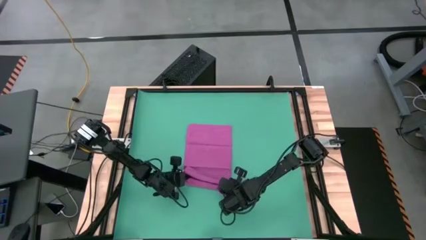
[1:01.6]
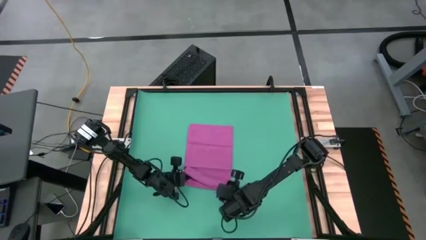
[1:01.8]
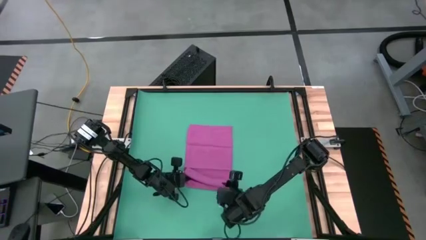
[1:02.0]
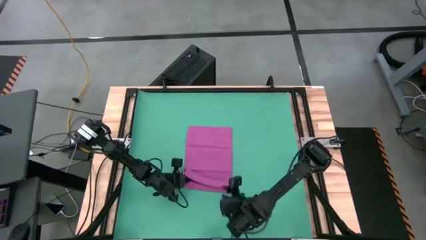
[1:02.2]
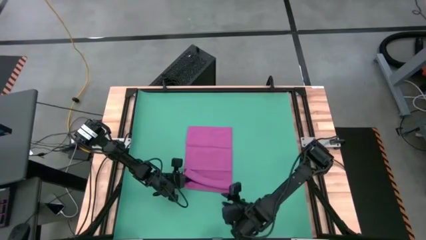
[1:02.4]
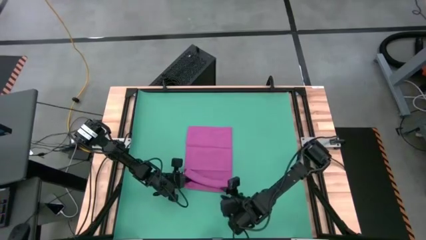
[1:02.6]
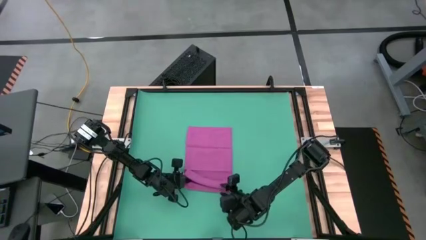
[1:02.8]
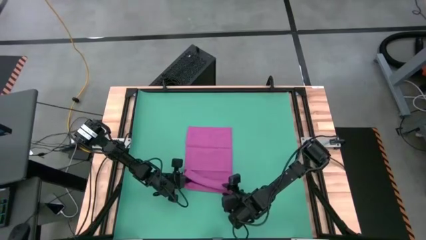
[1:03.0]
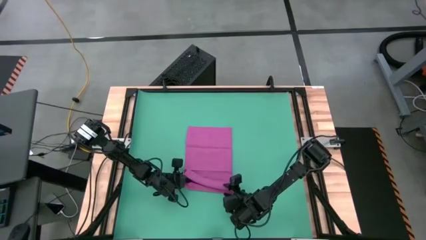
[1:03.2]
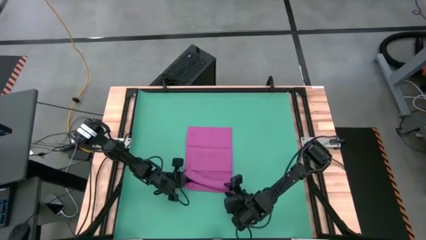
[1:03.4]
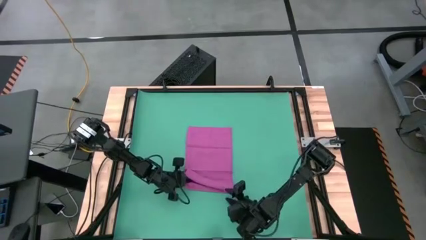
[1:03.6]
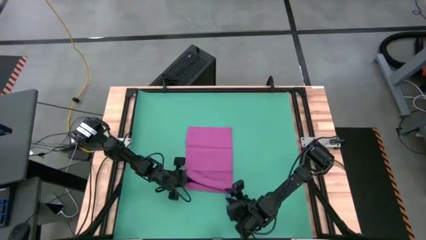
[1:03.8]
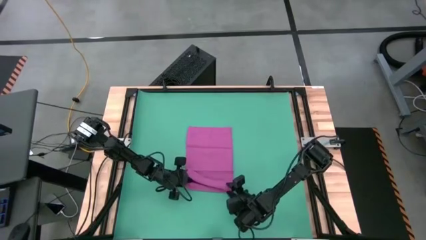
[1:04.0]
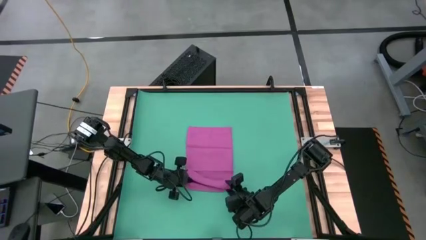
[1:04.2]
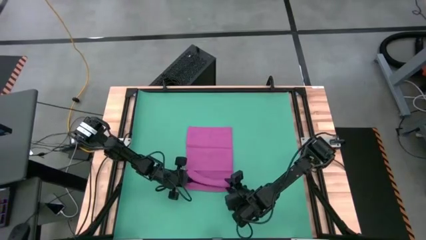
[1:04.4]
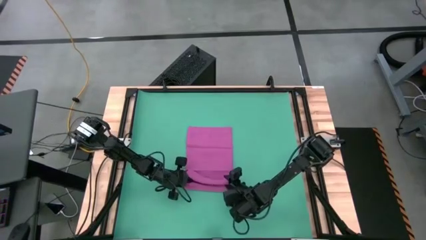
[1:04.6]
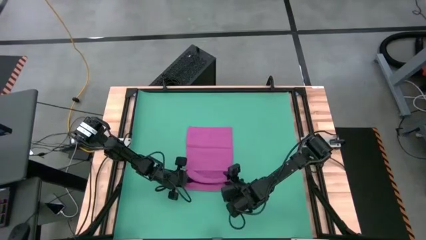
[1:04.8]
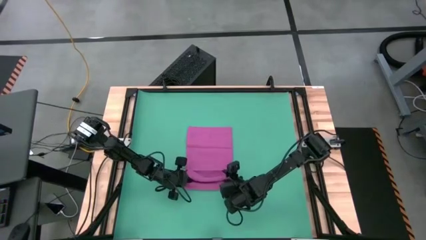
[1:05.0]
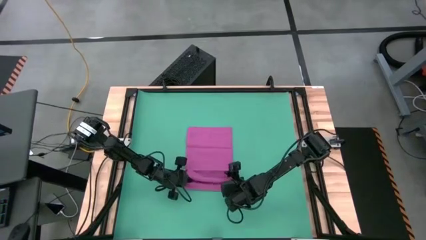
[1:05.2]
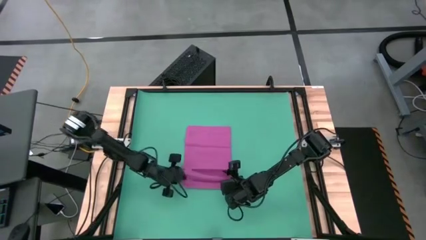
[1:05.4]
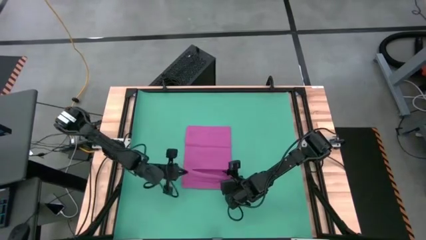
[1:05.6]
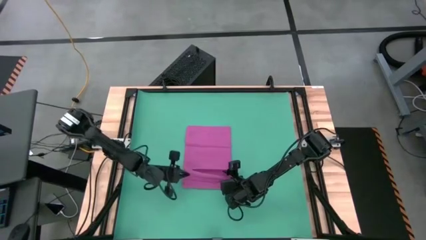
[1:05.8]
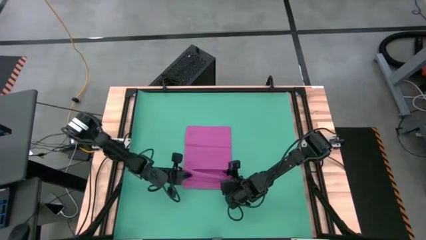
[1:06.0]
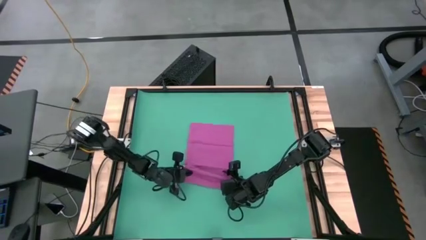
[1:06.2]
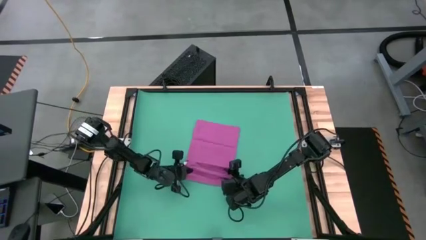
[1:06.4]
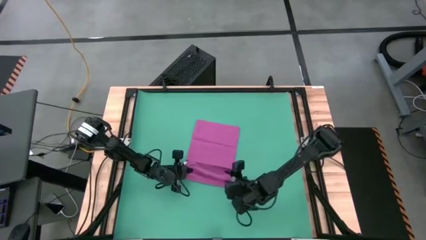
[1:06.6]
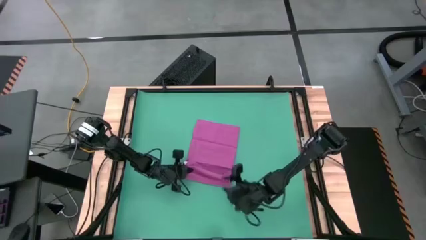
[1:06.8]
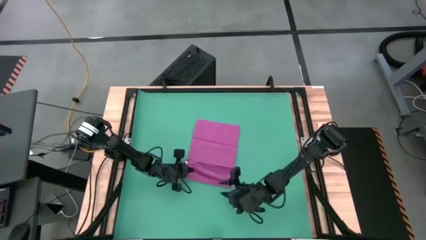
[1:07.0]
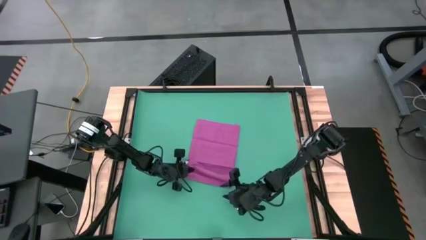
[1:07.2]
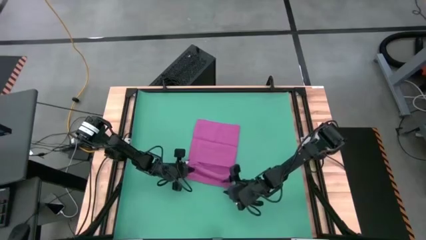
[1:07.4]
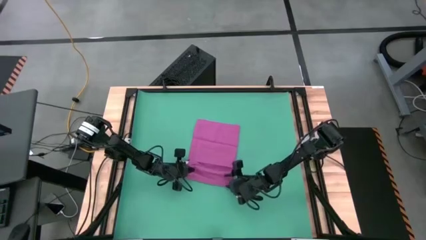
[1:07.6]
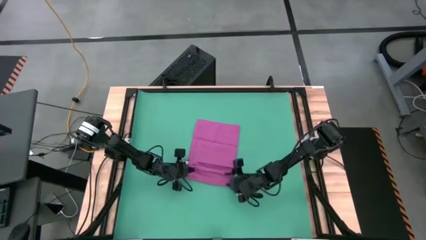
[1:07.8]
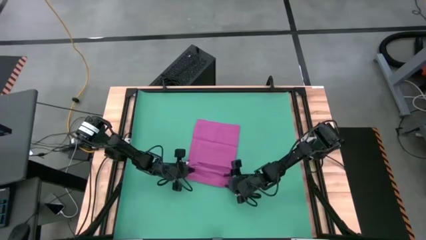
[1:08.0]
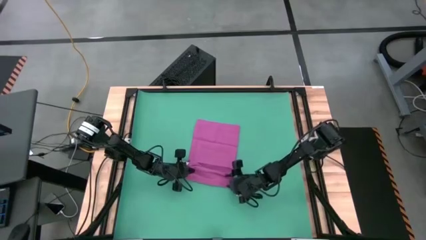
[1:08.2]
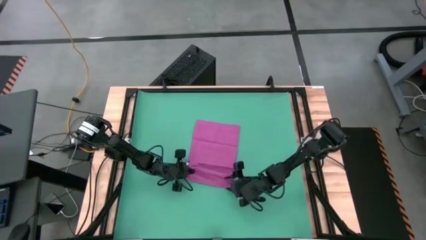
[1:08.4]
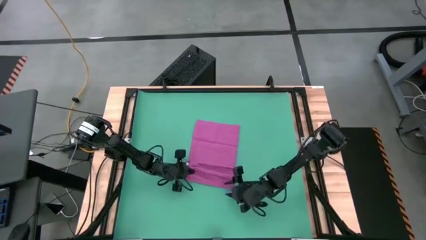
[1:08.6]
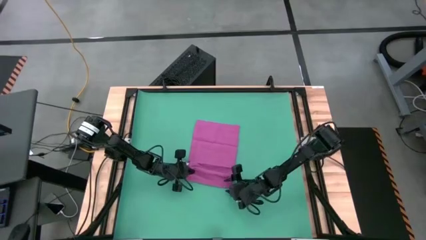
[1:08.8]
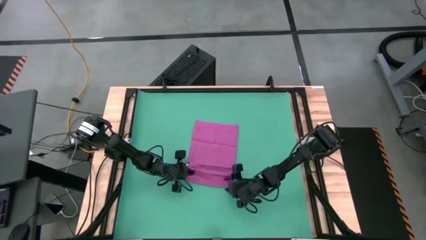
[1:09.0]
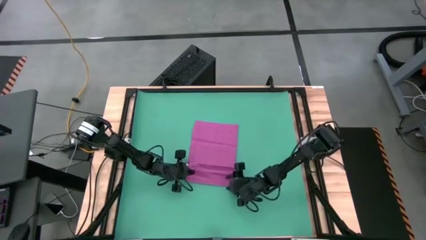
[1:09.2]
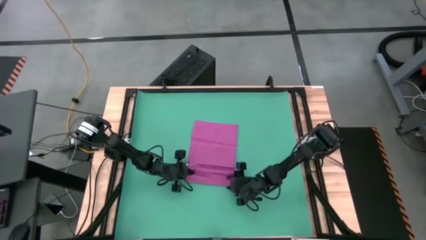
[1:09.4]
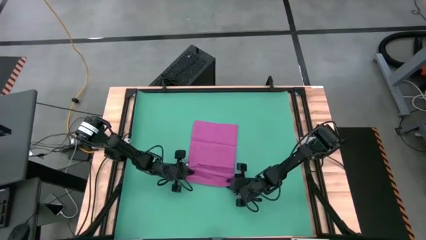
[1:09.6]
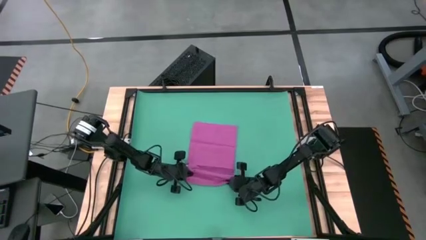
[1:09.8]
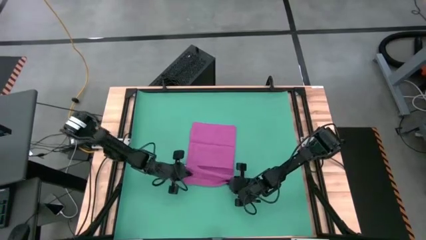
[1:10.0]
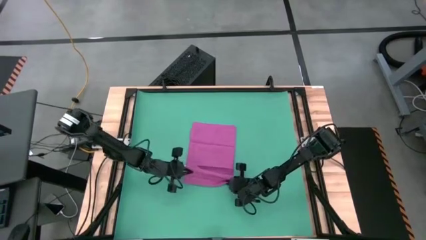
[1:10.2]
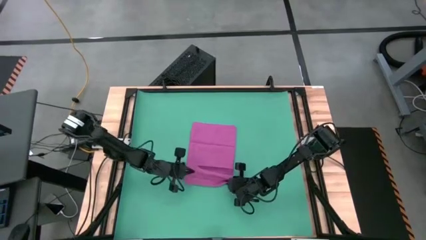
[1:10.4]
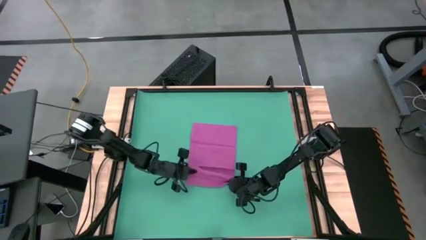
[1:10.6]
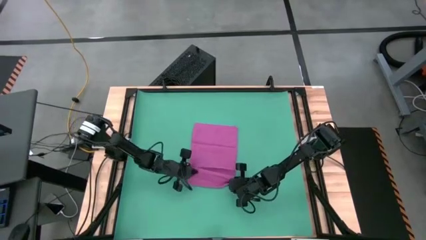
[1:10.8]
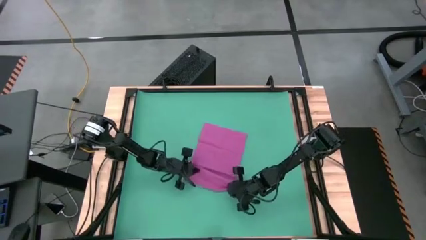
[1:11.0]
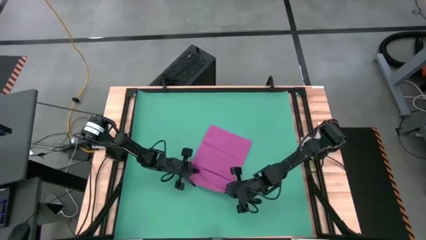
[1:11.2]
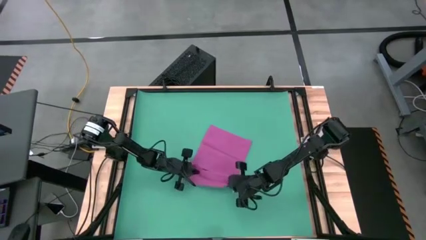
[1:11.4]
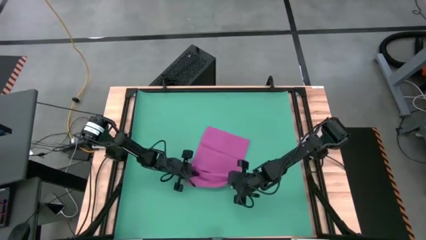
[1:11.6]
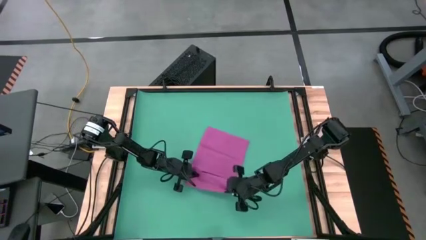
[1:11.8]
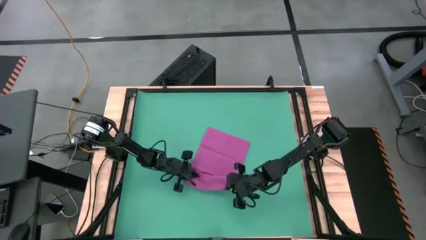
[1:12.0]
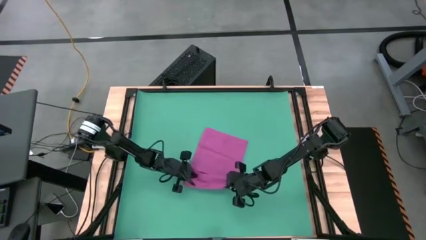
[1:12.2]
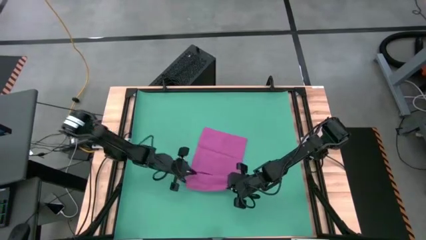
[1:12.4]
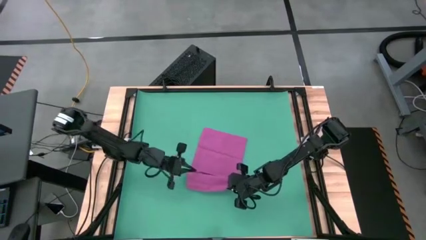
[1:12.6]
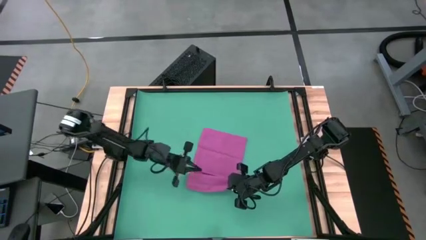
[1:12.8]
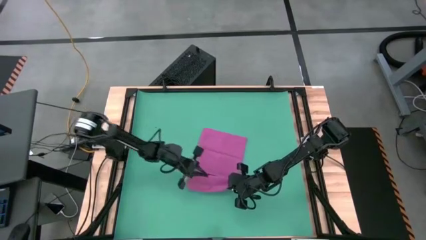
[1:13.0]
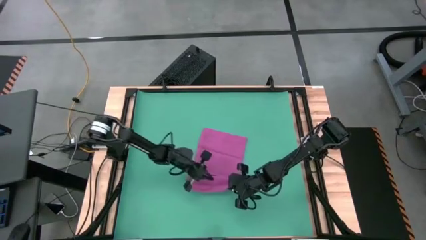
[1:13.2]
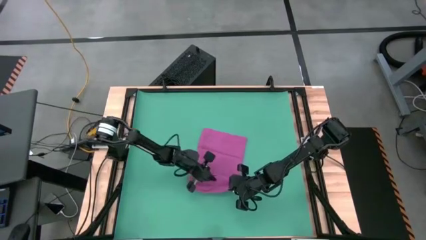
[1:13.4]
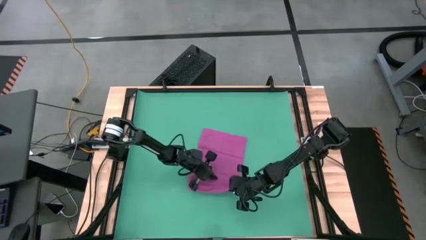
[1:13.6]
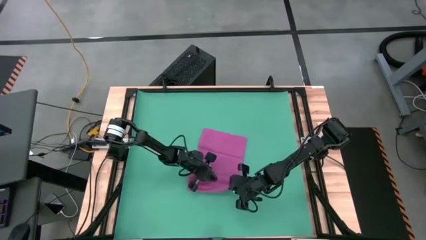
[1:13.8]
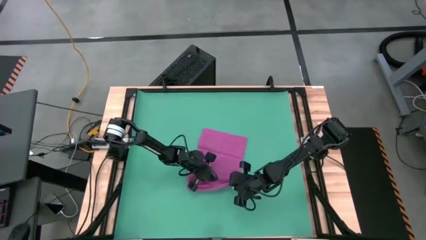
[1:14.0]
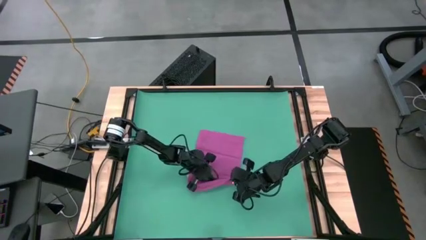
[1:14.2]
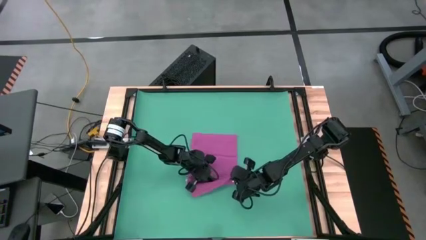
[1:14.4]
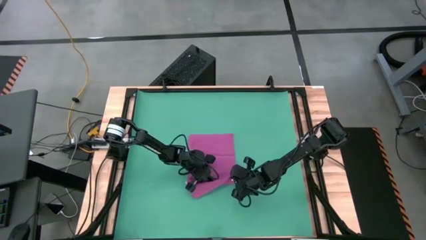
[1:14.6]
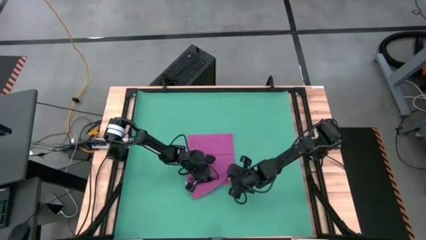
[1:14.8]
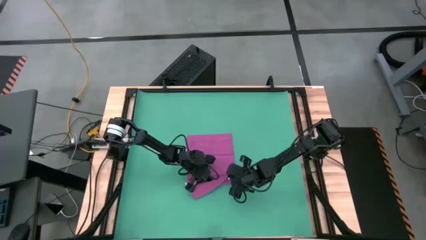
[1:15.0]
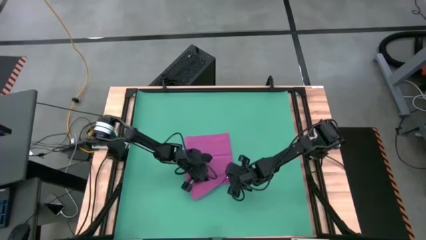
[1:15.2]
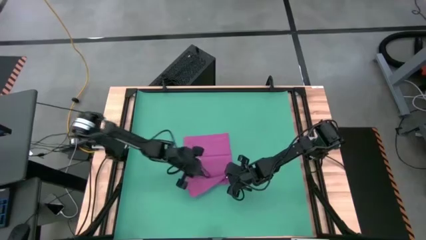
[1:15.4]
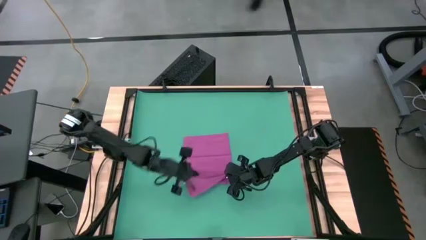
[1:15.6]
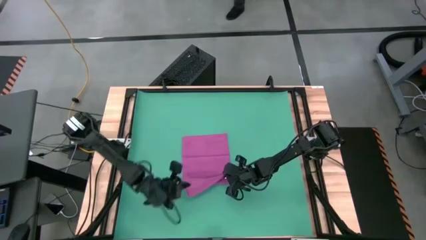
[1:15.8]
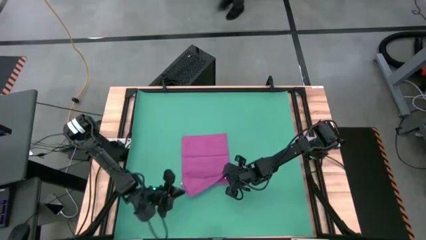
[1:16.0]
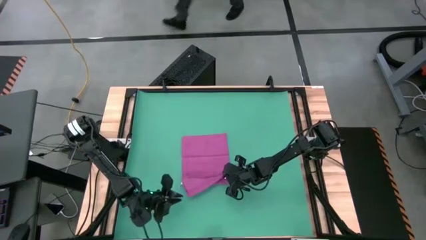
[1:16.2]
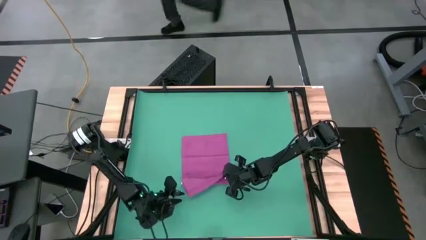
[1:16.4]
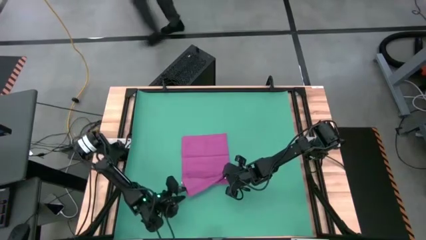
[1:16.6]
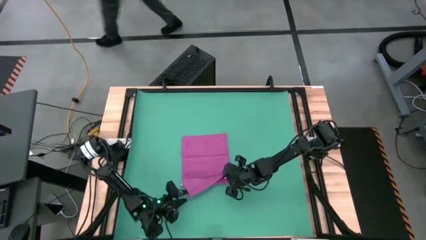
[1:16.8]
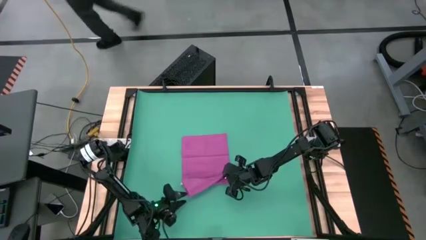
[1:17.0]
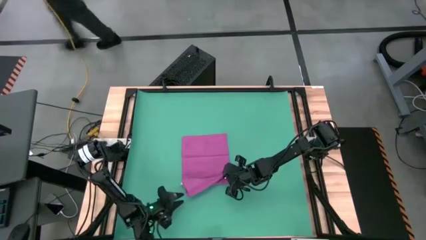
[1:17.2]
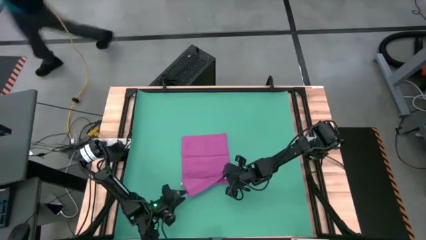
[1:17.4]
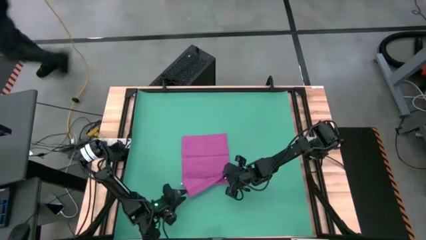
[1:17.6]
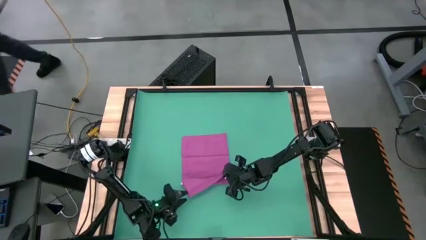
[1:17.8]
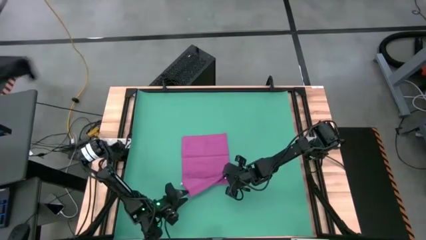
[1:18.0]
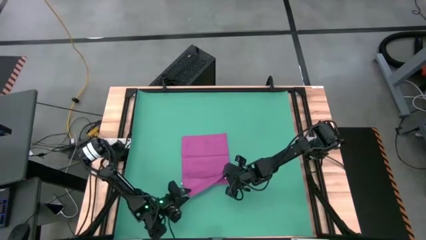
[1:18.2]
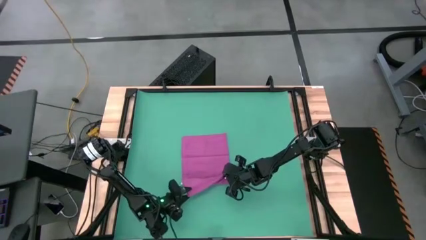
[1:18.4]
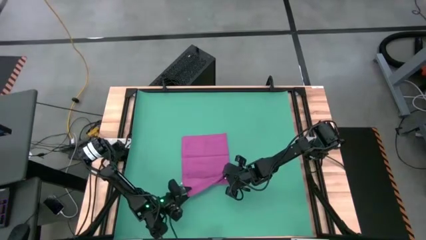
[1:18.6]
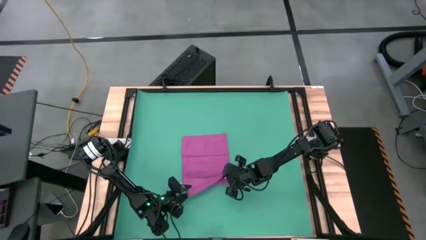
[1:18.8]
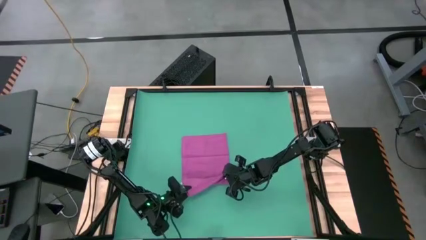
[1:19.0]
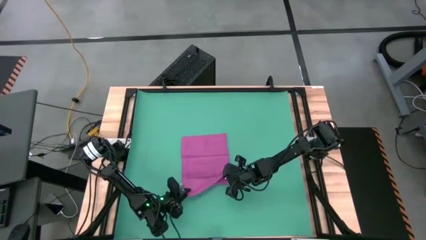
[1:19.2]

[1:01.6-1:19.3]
Task: Roll towel
Roll the pink towel
